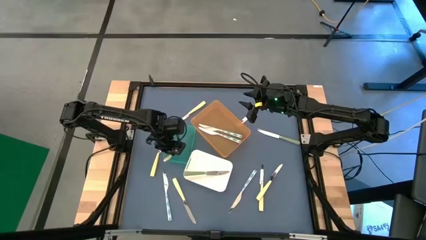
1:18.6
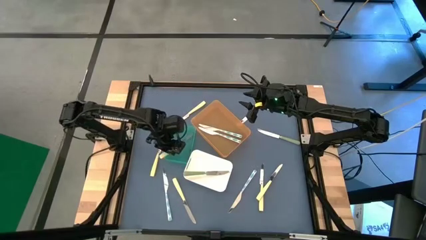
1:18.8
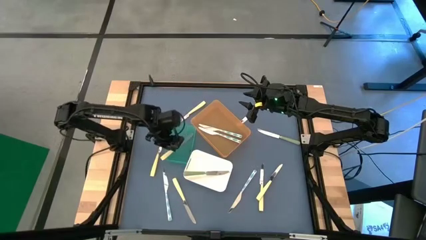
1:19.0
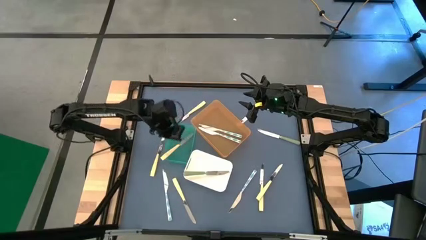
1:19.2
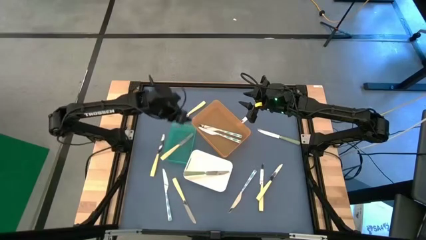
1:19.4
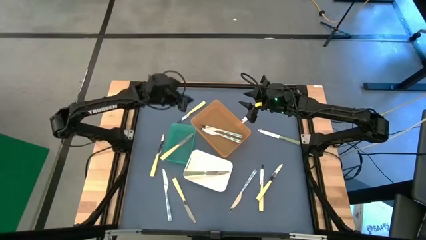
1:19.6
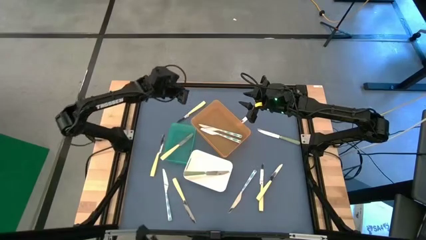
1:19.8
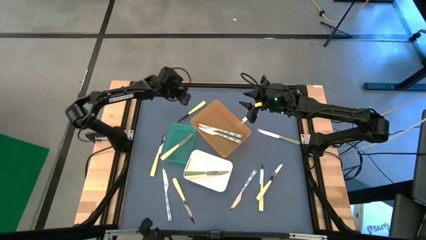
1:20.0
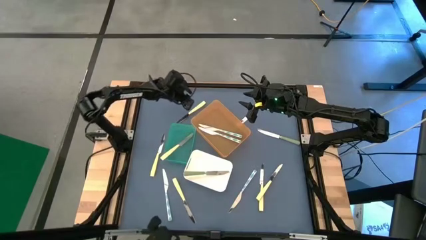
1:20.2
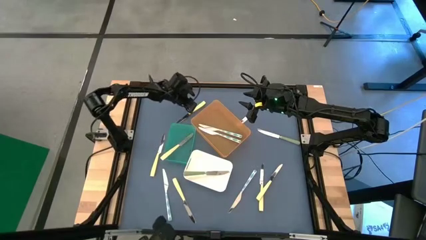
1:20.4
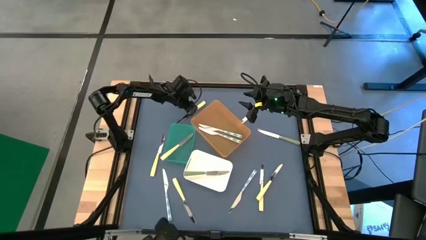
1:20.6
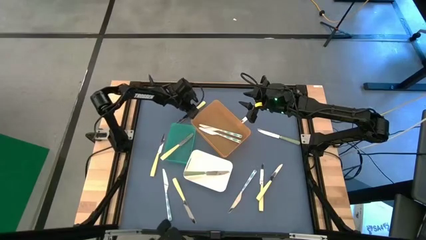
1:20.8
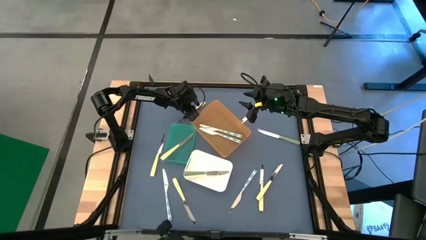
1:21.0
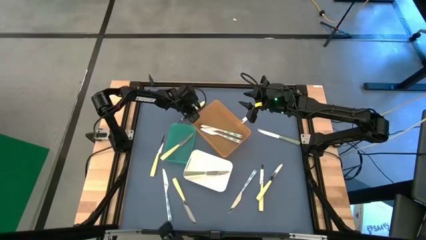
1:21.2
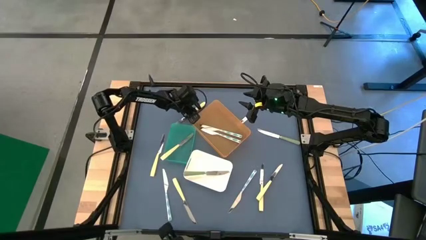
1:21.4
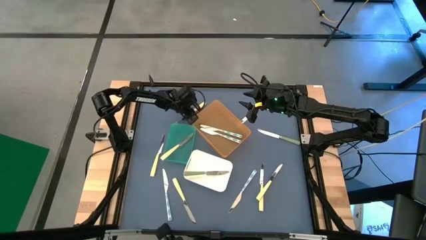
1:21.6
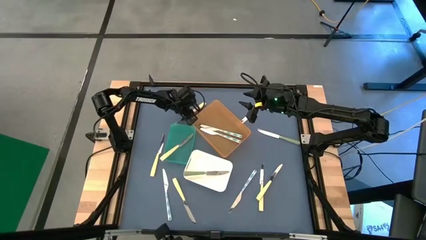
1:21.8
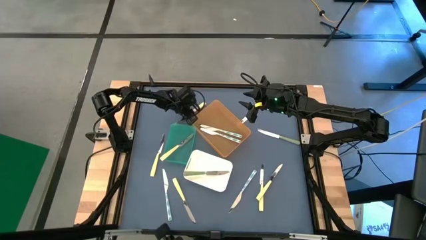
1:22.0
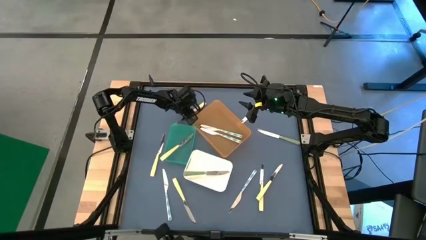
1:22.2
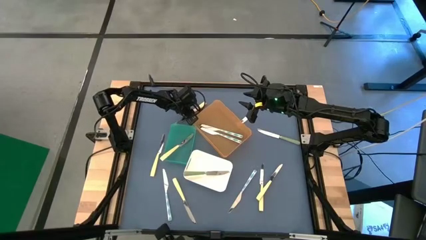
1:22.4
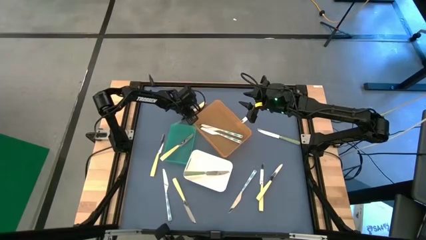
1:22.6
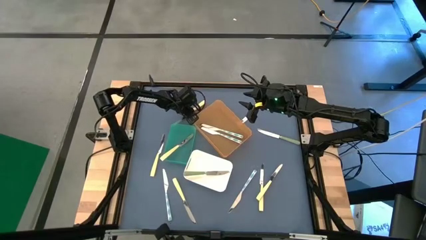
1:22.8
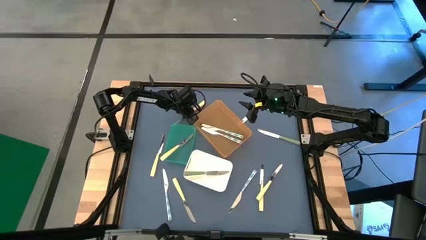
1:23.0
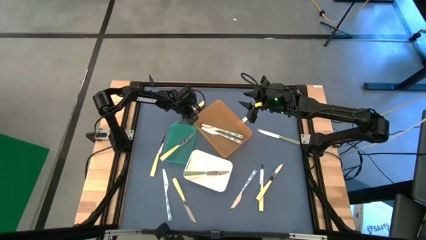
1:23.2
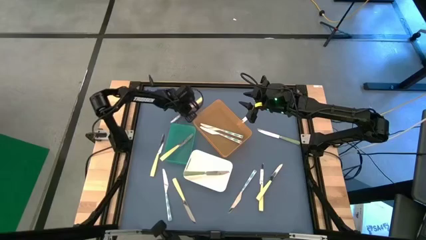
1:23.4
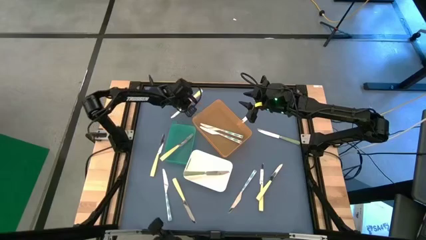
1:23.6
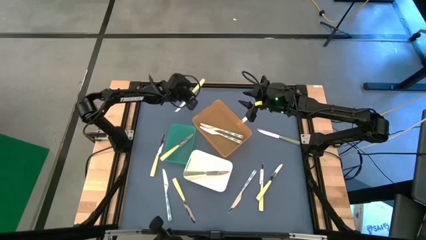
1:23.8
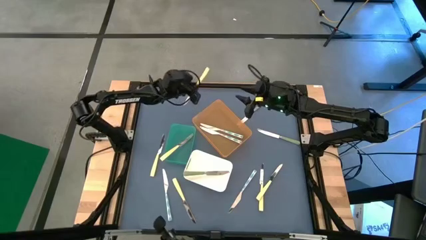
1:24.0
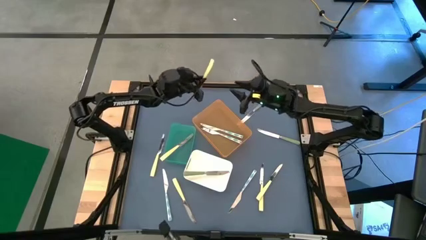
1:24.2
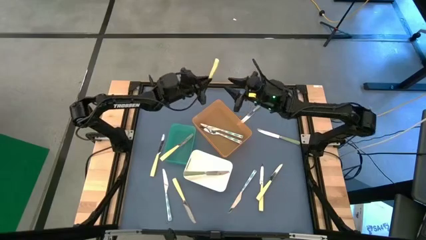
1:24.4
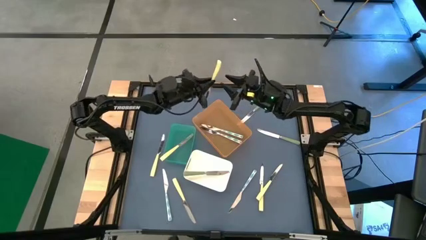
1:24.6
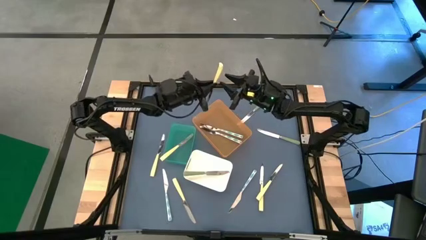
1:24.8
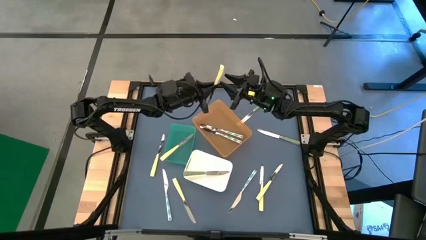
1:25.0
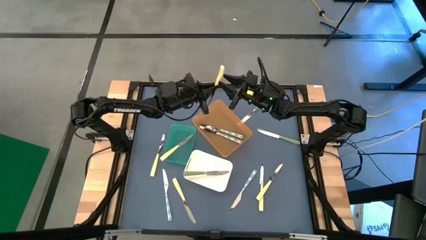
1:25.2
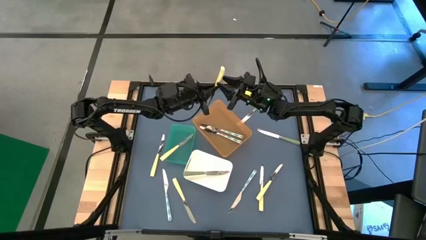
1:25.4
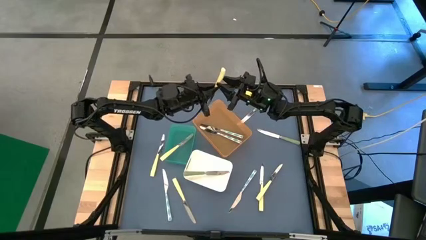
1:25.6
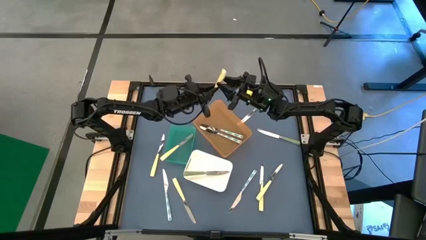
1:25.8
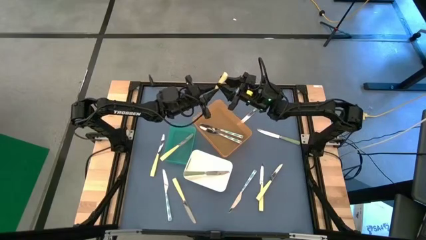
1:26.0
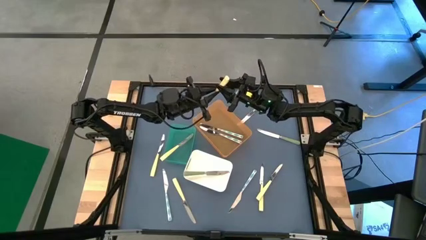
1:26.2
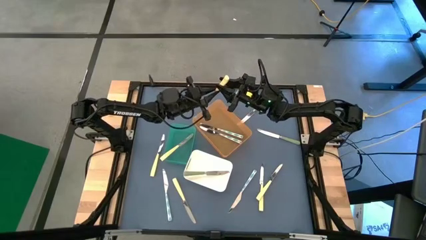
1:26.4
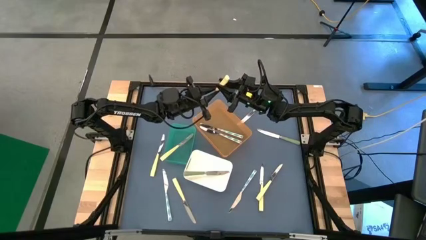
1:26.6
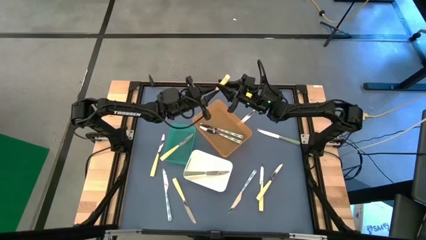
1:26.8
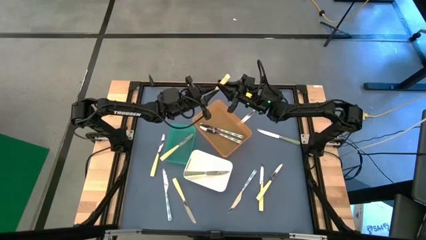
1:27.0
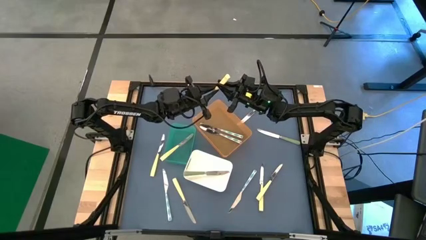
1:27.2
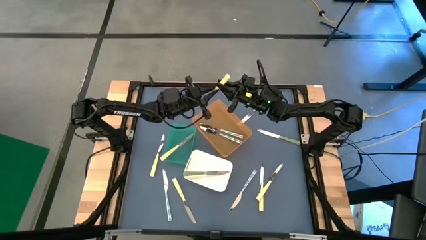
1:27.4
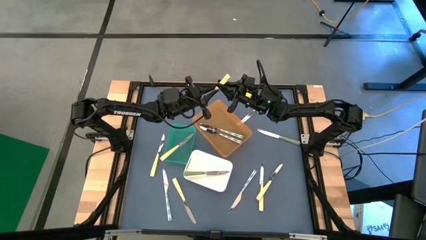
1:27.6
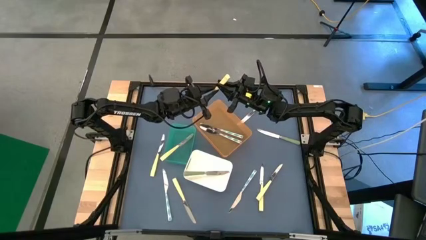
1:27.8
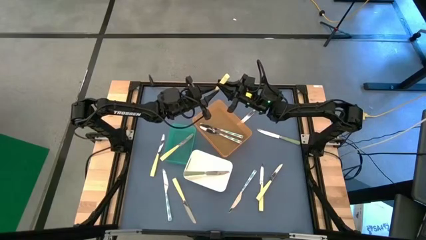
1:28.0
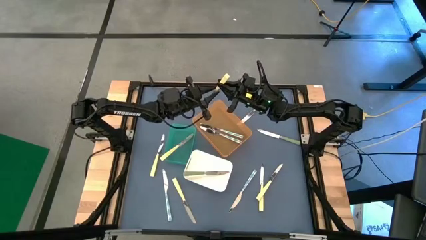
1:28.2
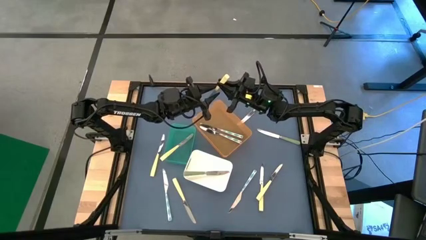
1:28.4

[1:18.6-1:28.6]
Task: Sort silverware by color (type)
Put the yellow table knife into the green bin

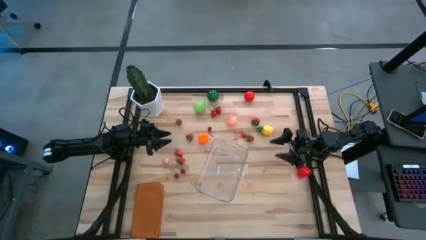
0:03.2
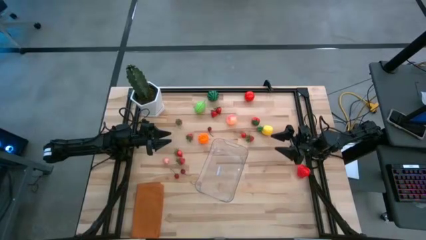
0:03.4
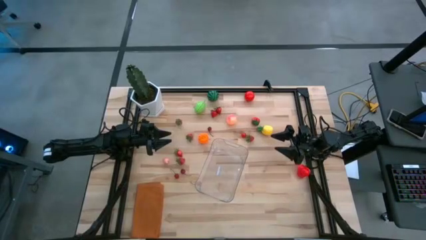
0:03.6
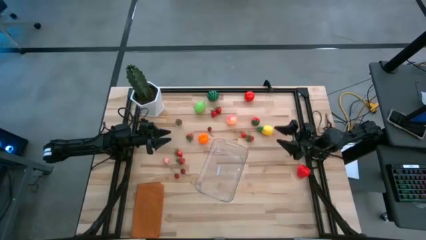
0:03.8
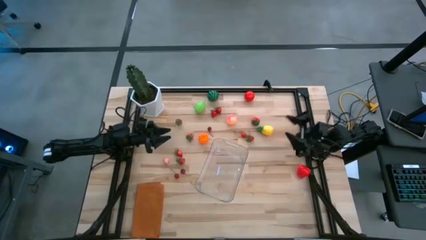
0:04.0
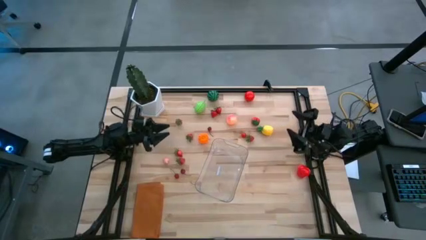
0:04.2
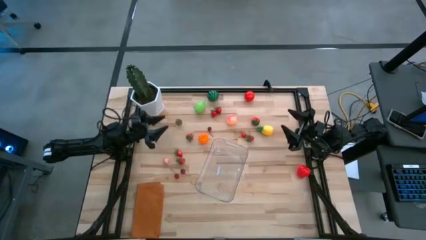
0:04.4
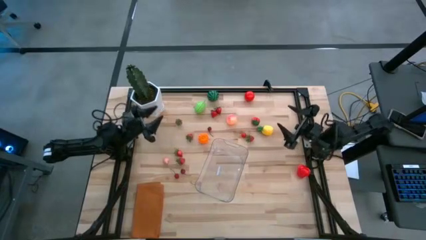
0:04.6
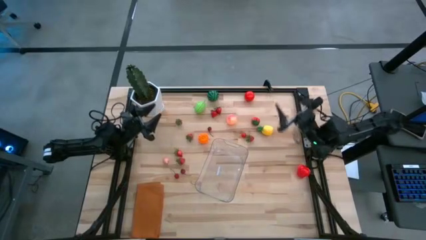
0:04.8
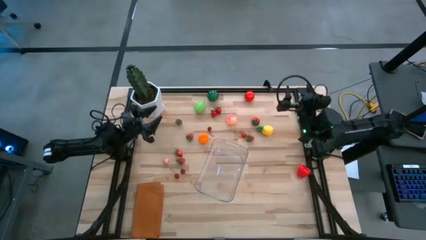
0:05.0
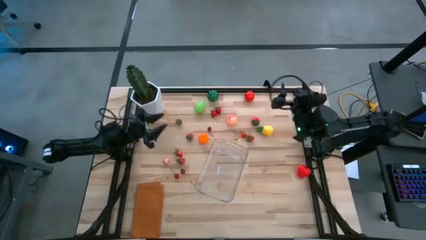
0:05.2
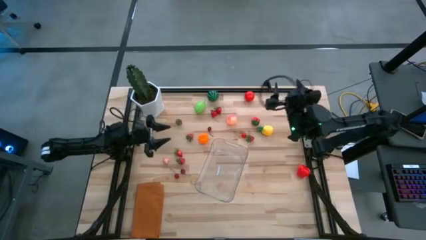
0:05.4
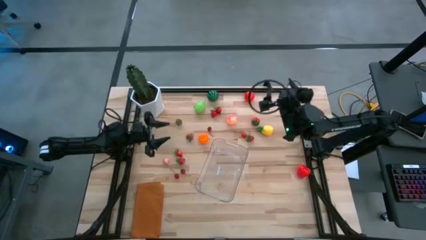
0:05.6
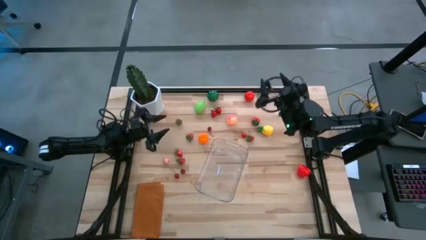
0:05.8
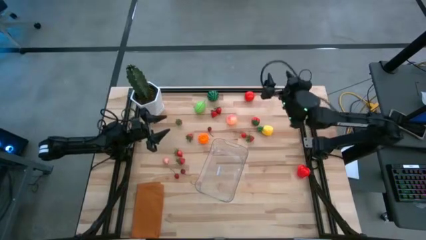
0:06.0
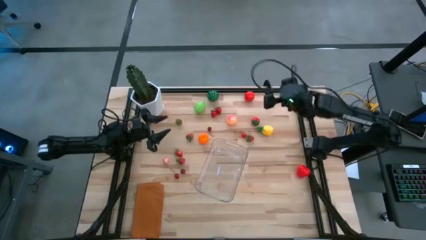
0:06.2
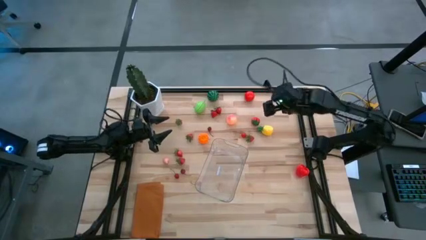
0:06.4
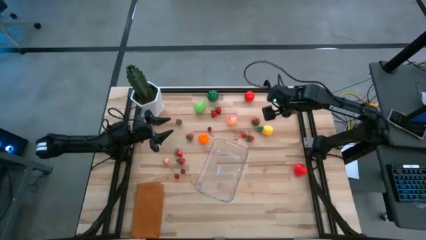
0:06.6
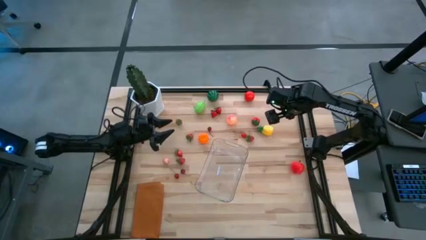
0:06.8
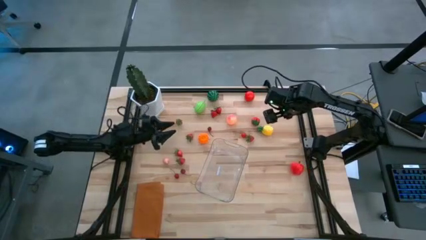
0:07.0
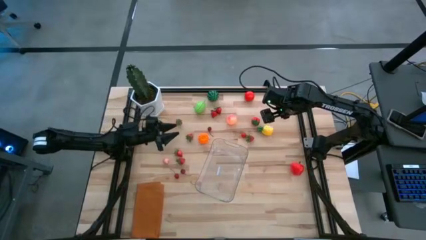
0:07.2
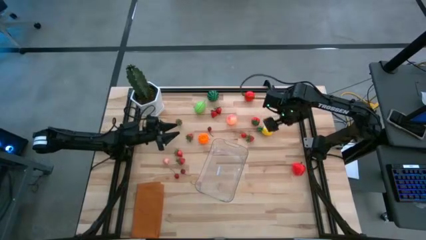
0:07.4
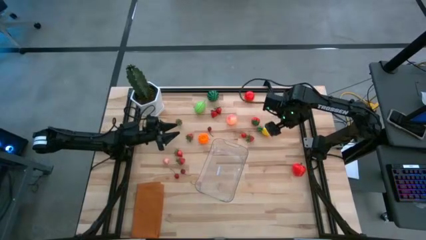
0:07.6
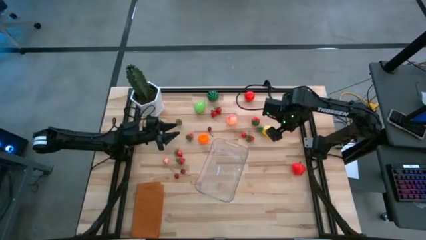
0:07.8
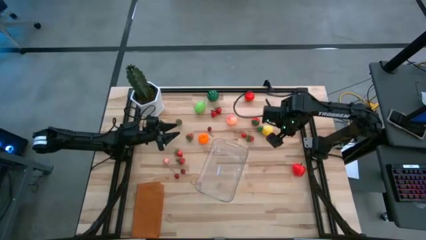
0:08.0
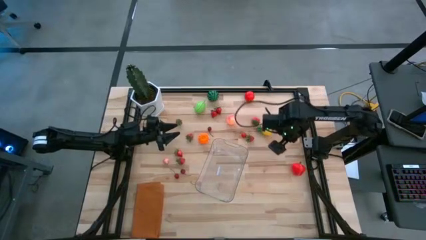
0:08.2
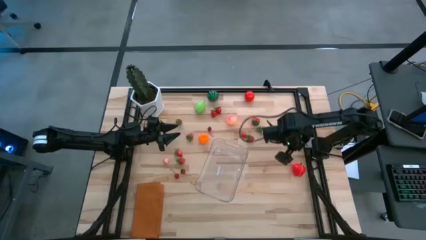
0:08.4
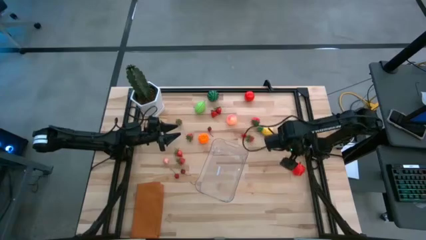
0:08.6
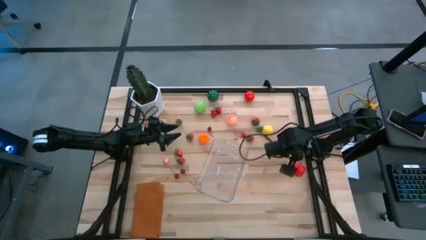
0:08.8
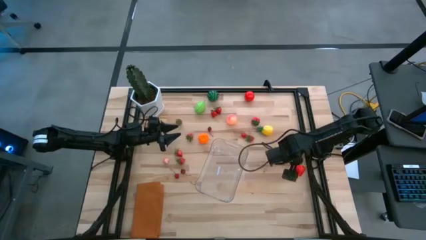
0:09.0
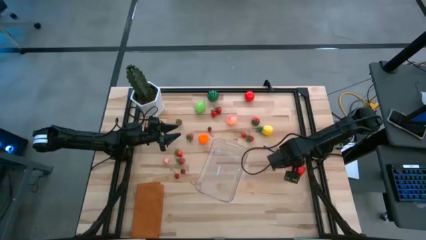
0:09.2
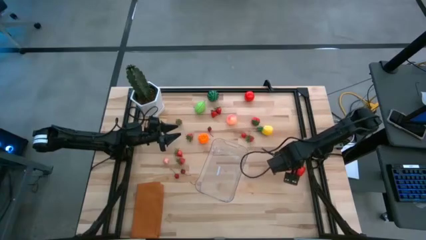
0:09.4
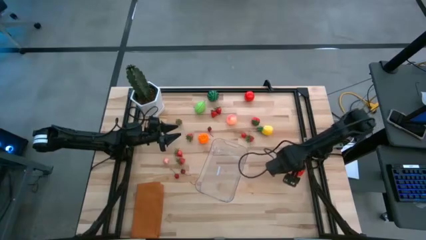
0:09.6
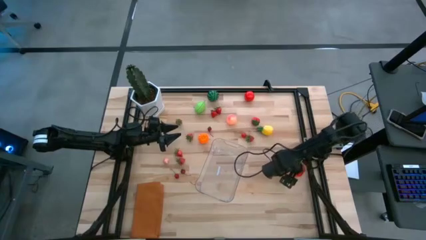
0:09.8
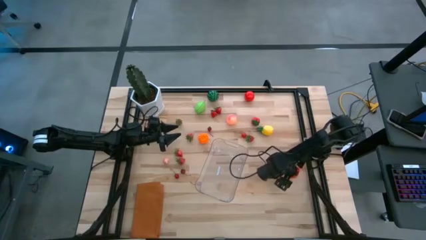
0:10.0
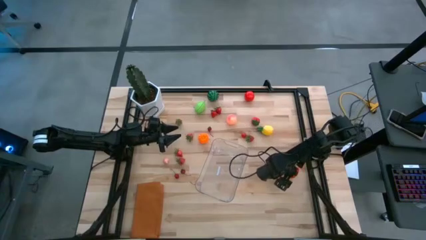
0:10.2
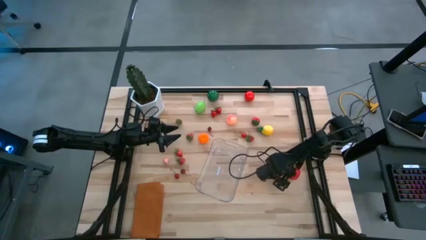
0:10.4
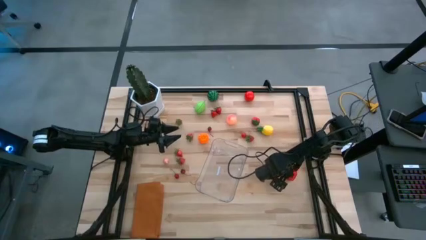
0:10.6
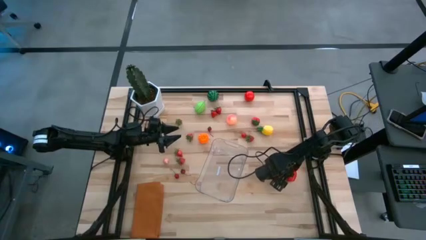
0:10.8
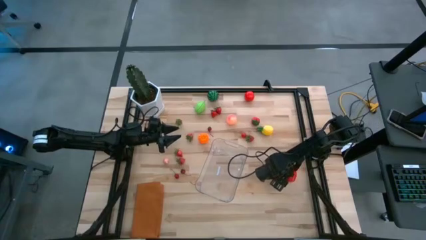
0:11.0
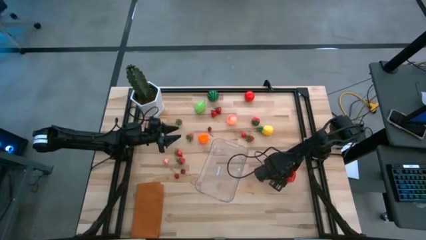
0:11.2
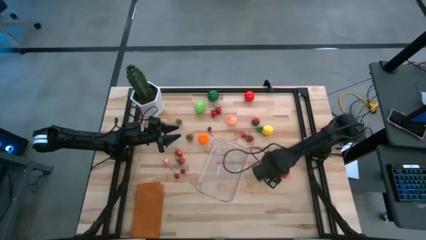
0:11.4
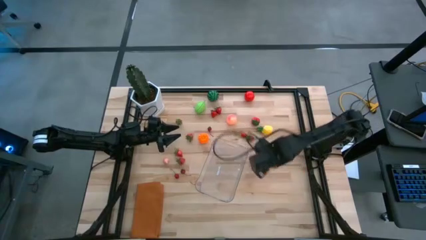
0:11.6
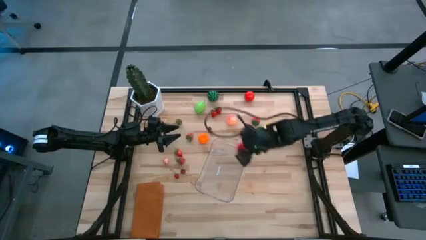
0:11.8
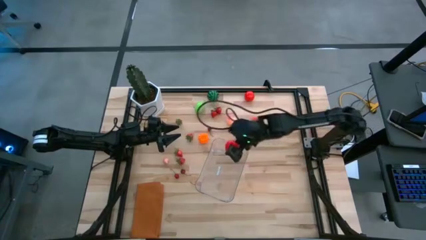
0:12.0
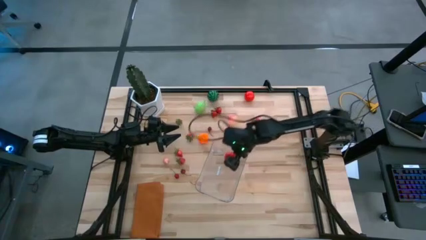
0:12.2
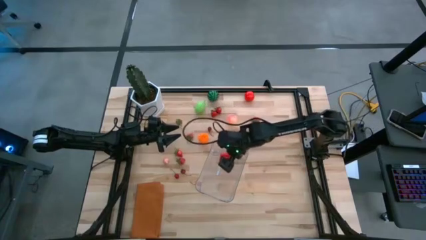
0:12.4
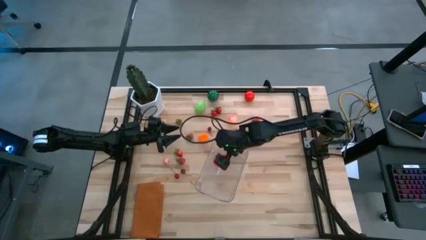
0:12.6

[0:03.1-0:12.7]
Task: Pick and placing Produce into tupperware
Put the red apple into the transparent bin
